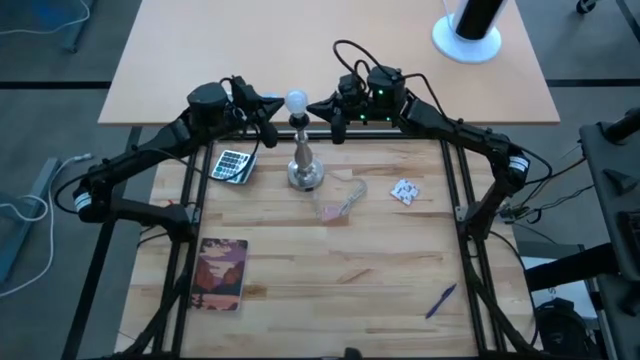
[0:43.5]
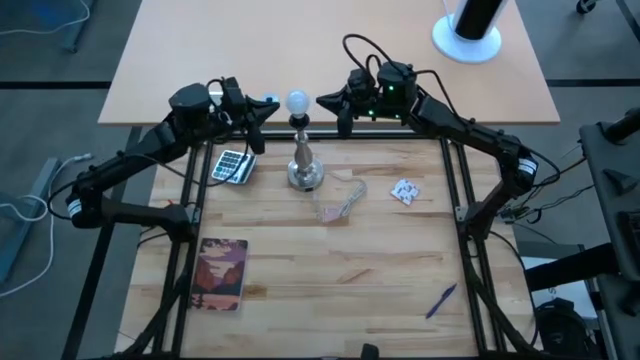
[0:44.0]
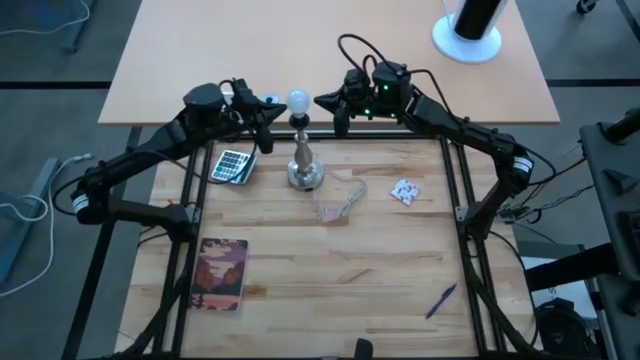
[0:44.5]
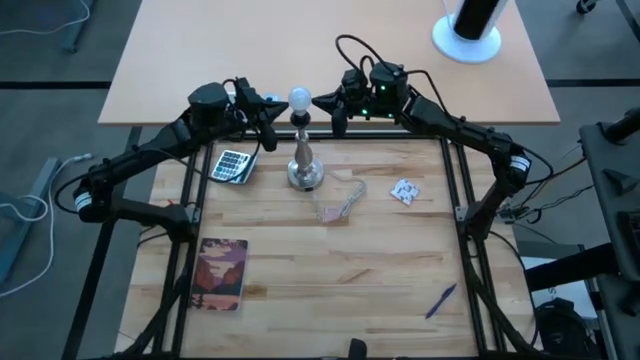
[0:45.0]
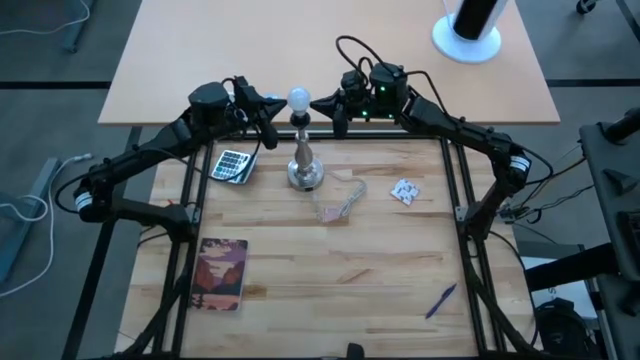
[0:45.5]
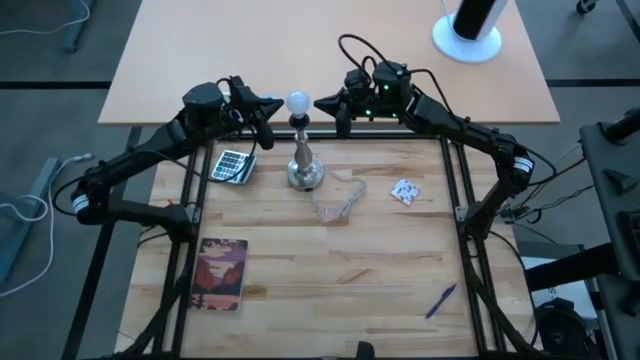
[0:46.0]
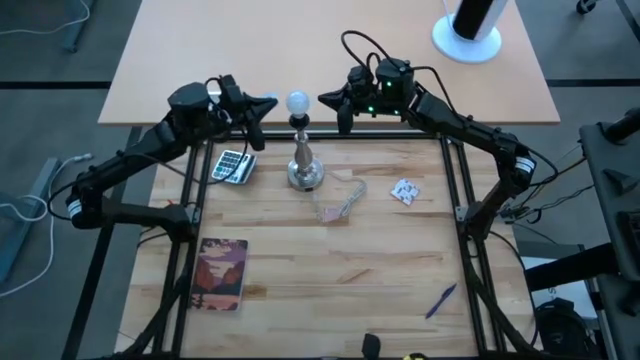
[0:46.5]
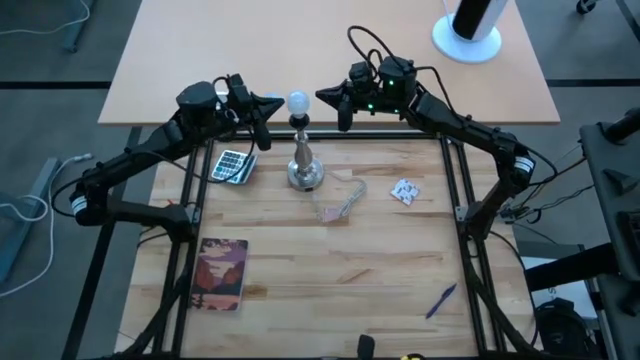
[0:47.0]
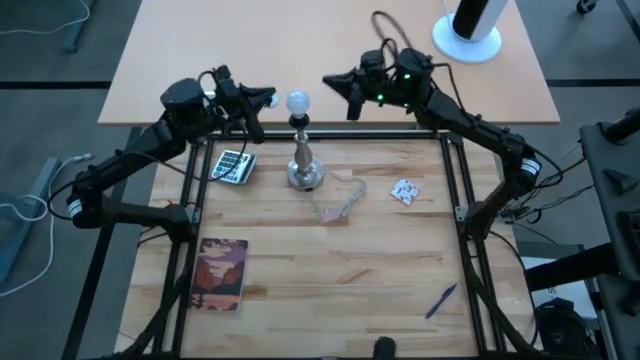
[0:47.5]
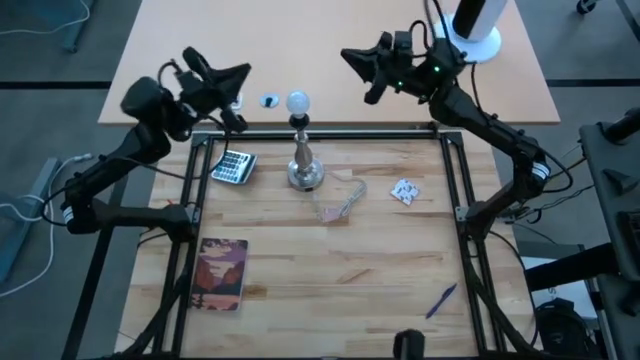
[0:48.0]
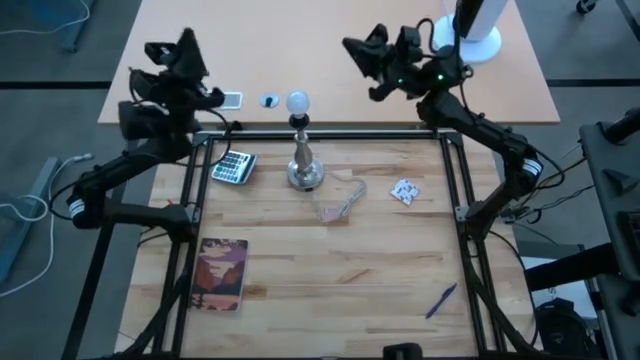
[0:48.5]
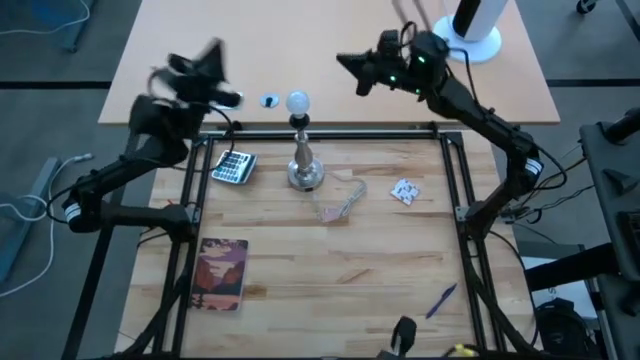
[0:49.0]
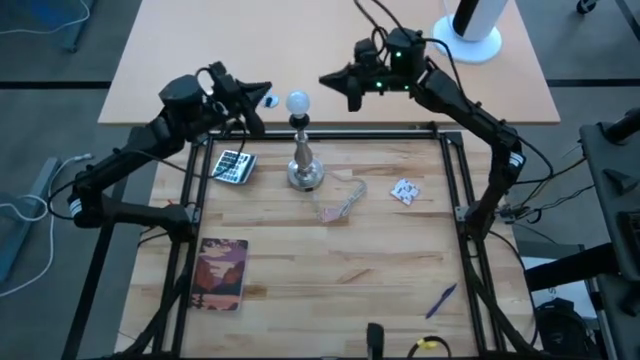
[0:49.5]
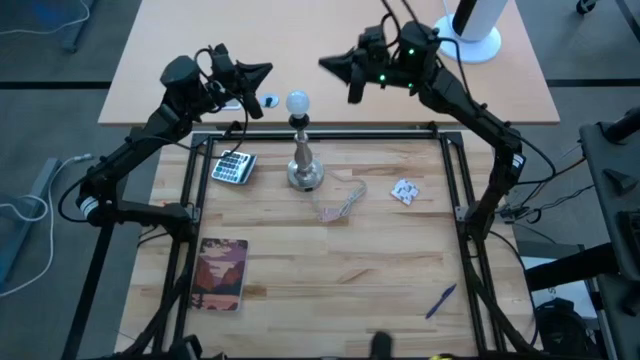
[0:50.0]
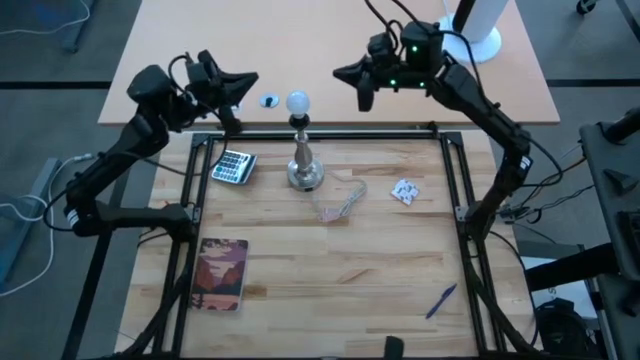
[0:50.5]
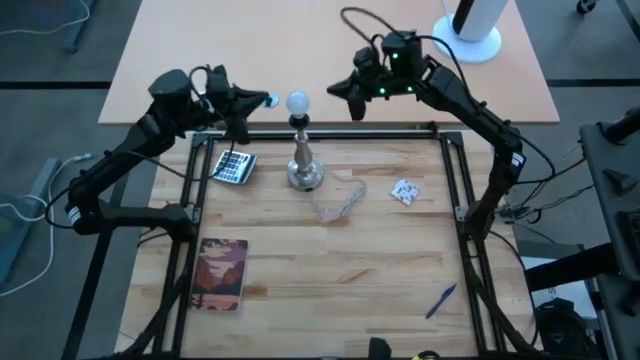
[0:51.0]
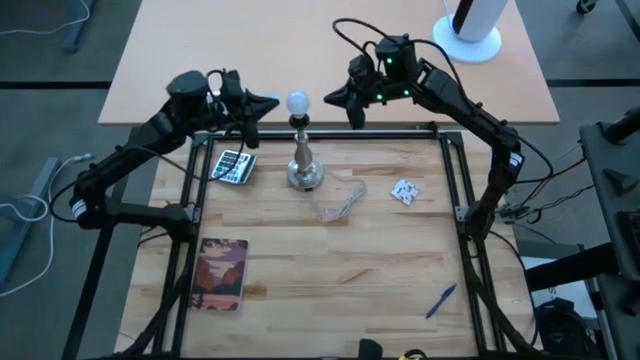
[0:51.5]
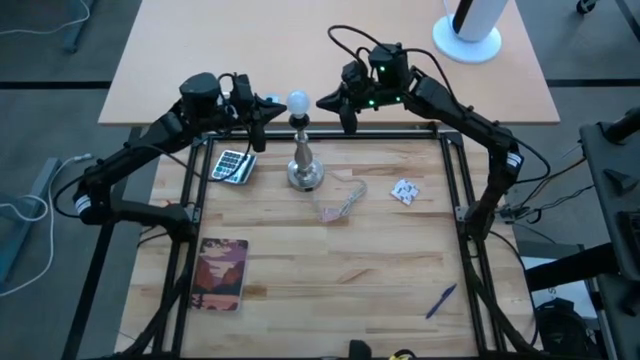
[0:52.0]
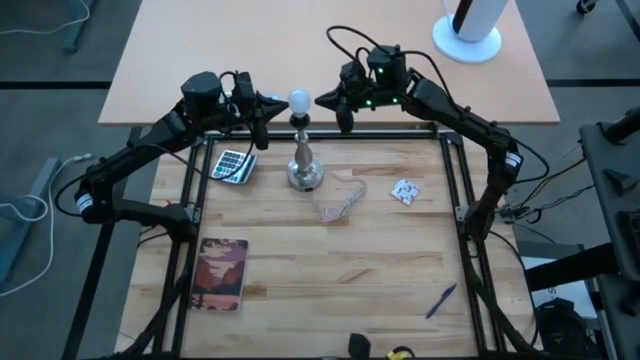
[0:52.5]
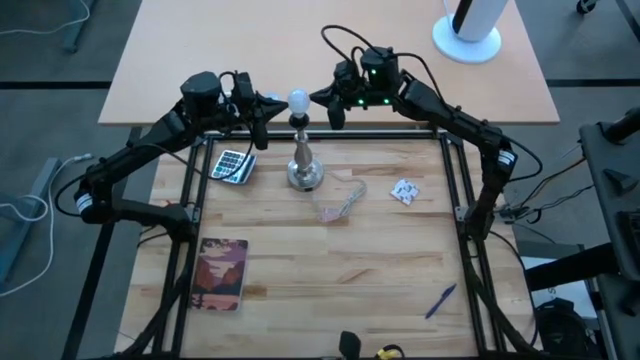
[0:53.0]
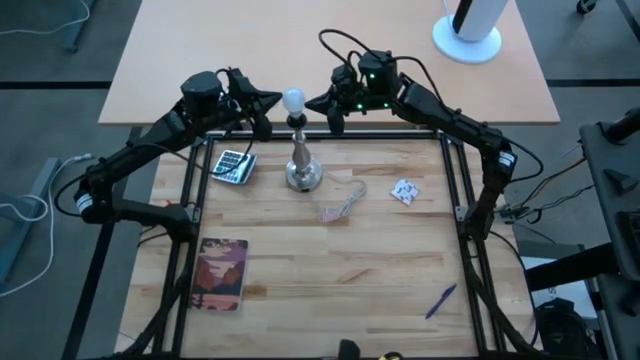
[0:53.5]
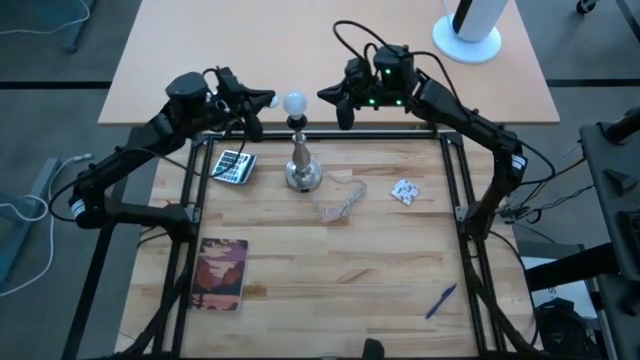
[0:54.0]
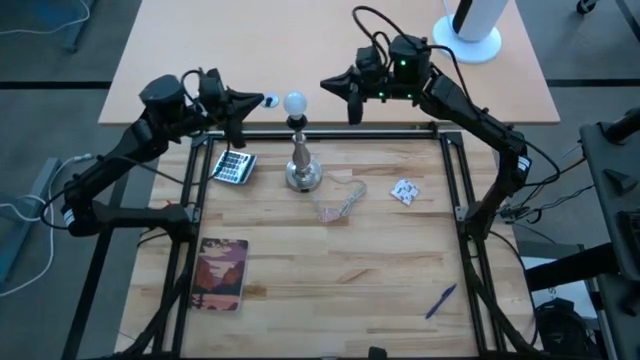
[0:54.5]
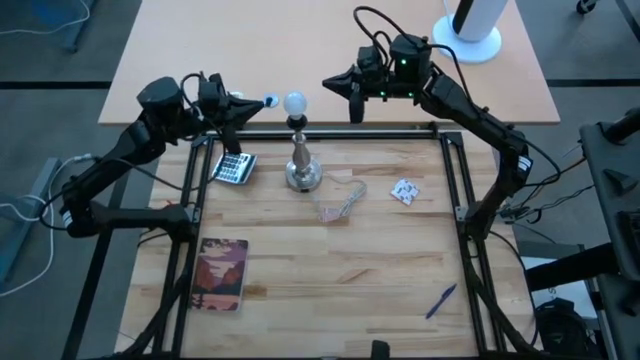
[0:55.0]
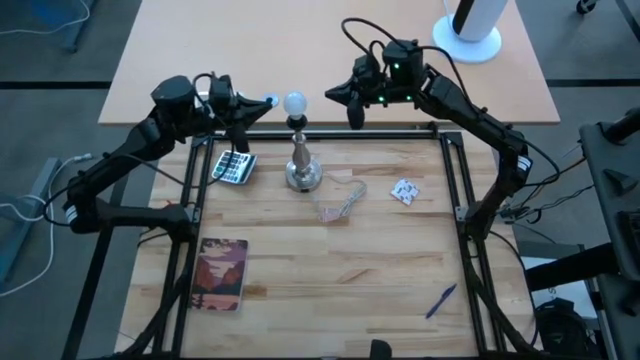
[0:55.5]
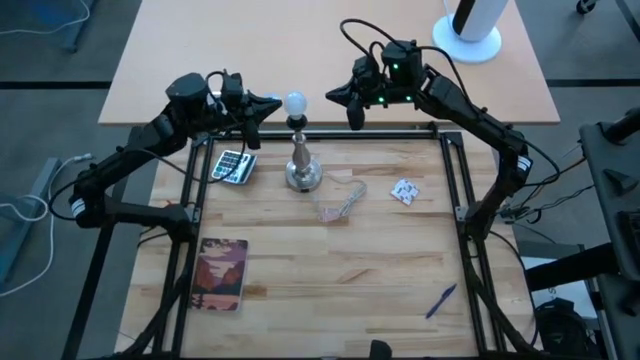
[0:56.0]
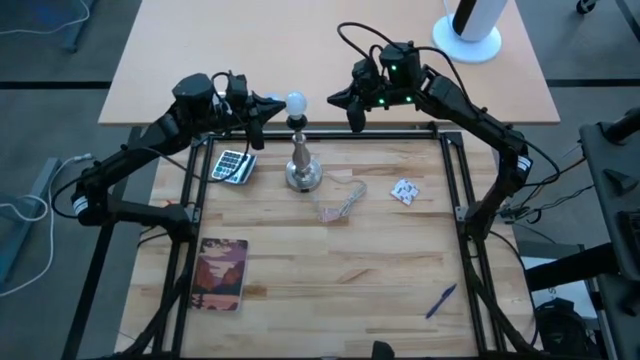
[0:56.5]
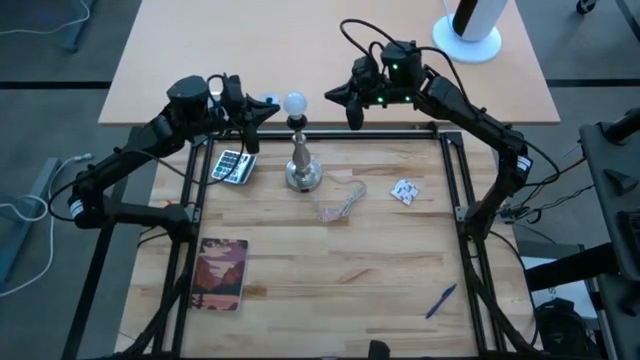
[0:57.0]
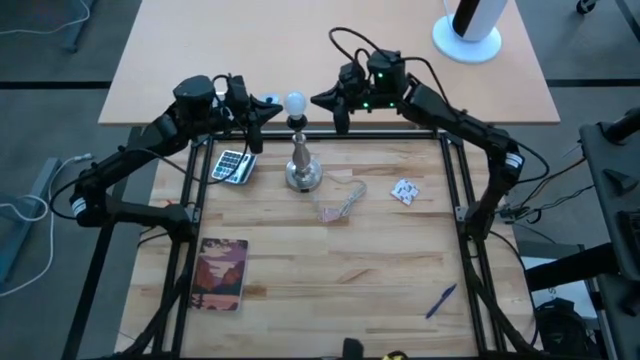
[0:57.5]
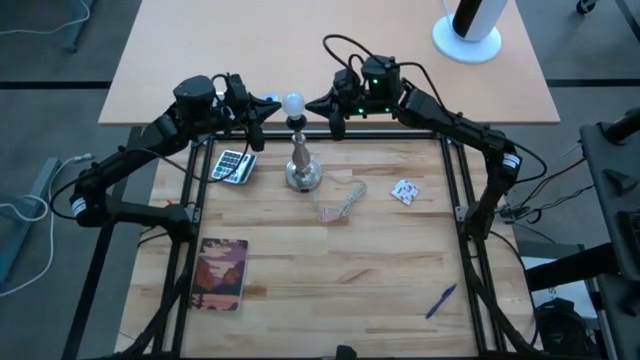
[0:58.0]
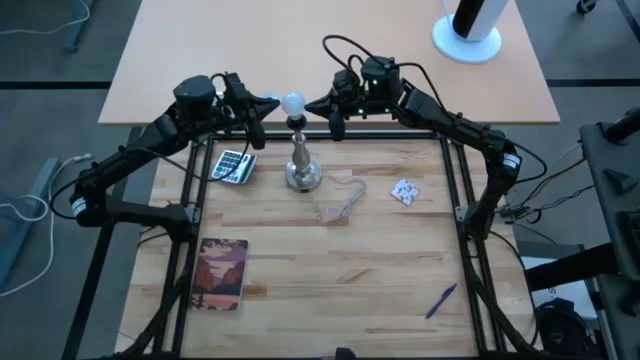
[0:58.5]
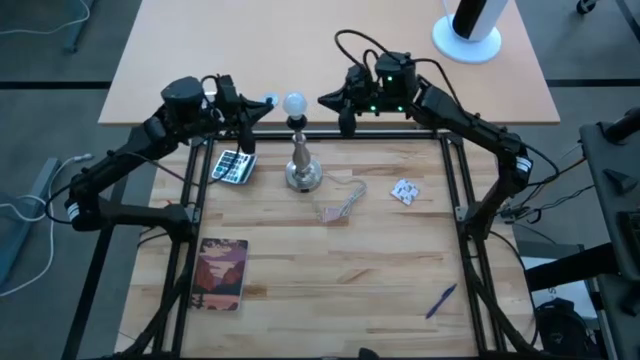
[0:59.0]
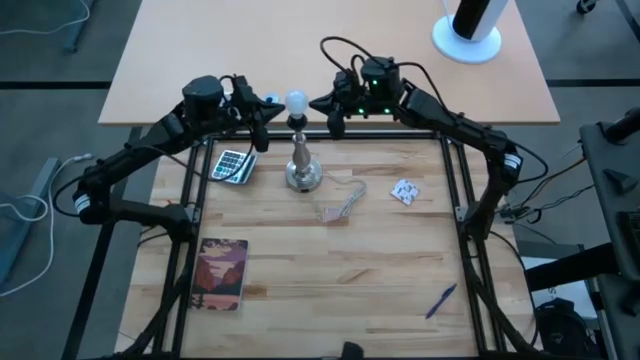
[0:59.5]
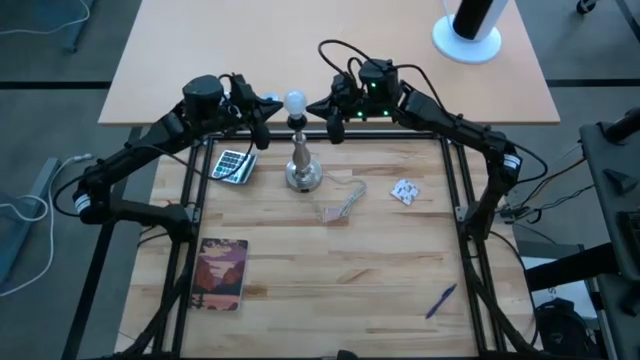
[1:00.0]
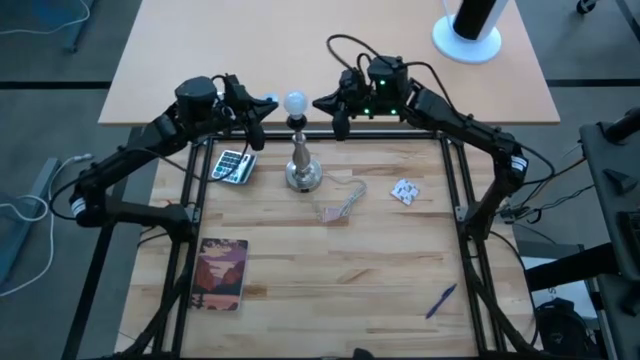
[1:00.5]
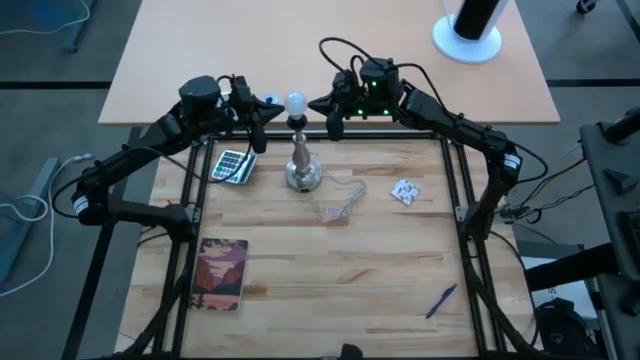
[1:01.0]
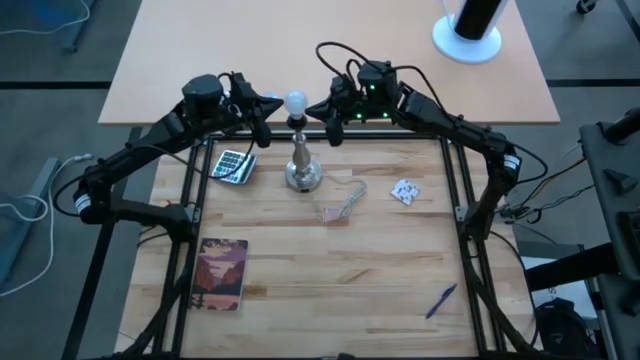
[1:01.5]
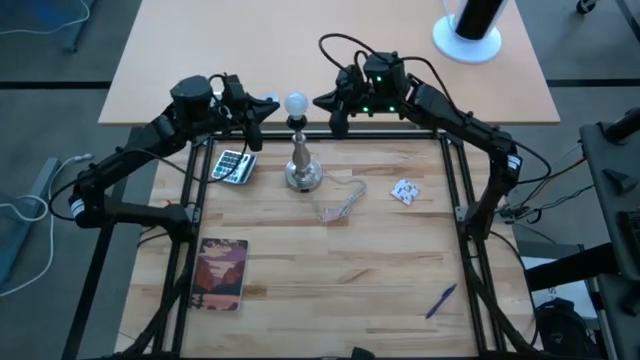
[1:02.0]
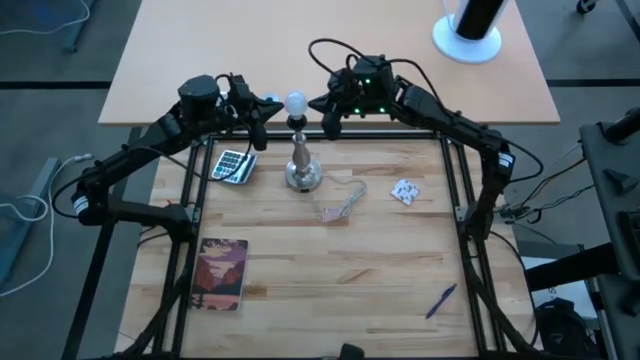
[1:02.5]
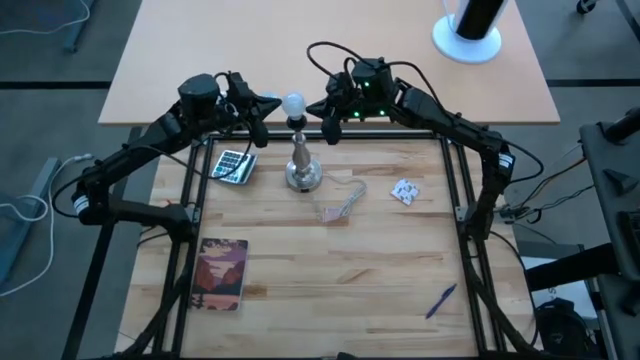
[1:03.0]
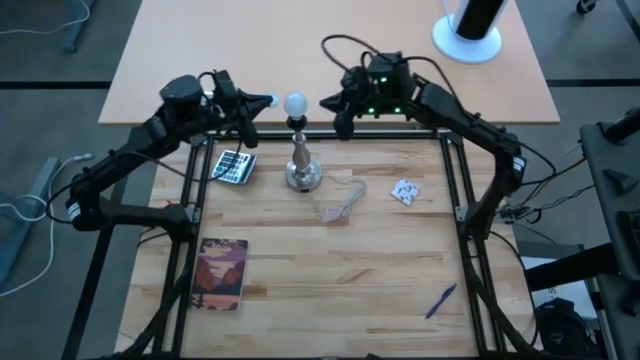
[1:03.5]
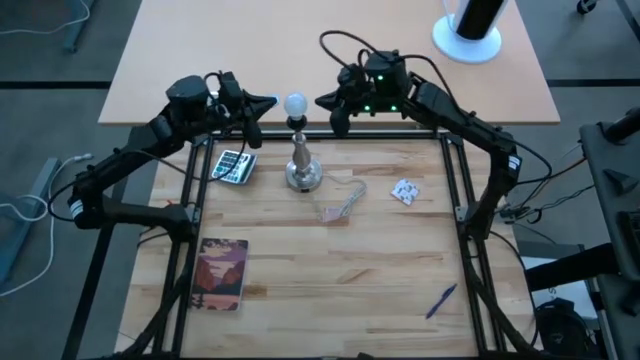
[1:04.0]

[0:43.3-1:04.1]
Task: Screw lightbulb
Insert the lightbulb into the lamp
